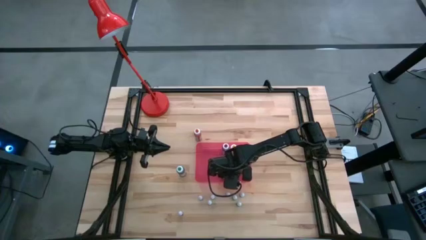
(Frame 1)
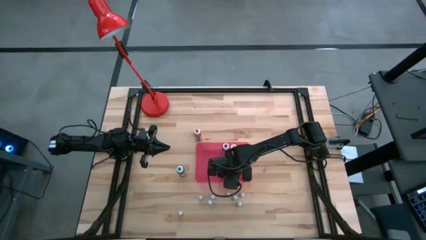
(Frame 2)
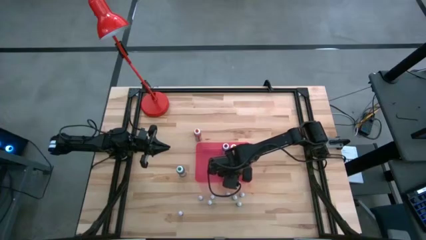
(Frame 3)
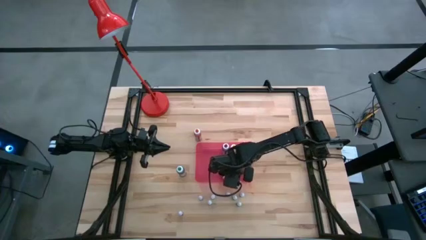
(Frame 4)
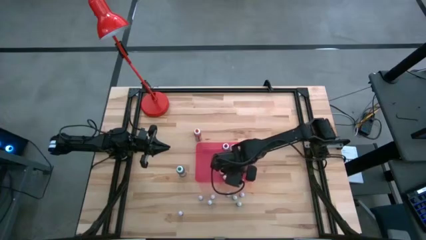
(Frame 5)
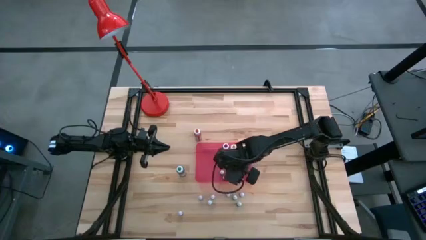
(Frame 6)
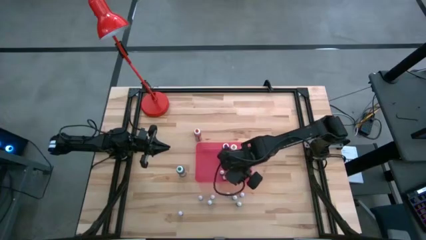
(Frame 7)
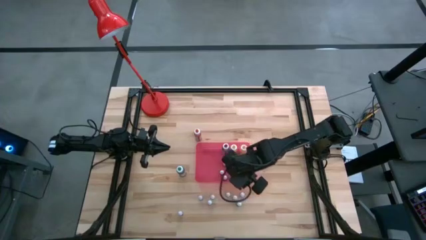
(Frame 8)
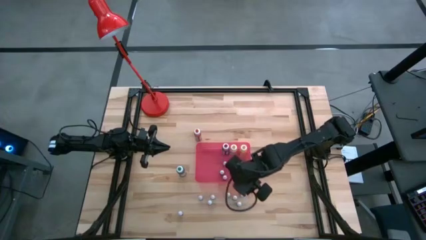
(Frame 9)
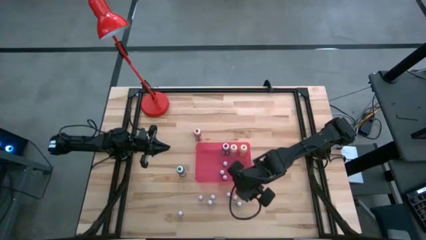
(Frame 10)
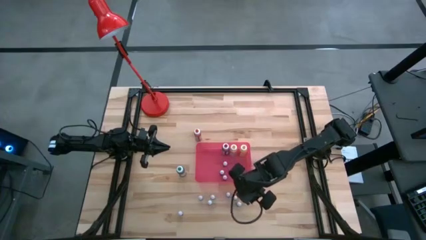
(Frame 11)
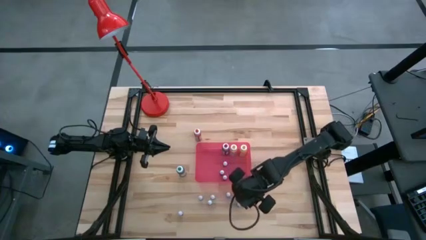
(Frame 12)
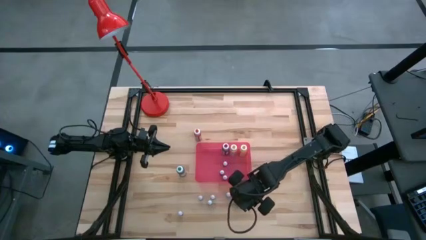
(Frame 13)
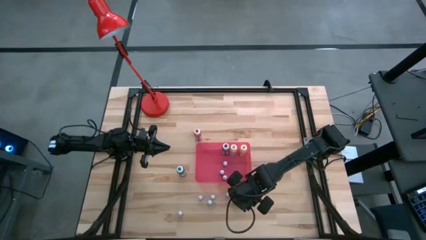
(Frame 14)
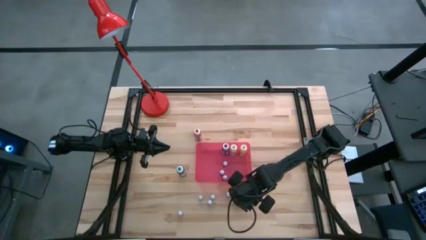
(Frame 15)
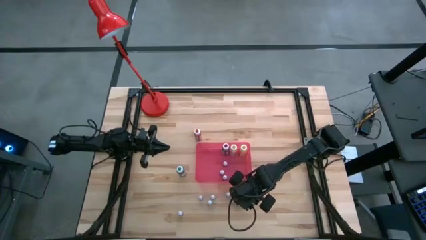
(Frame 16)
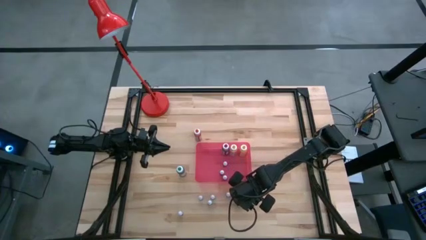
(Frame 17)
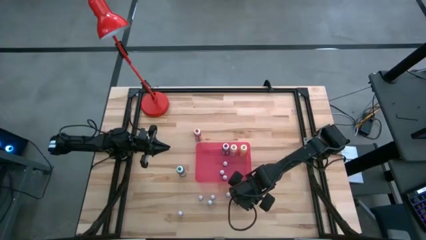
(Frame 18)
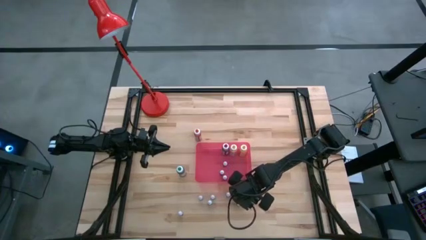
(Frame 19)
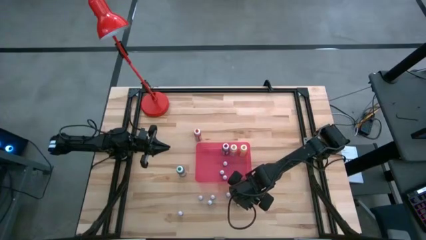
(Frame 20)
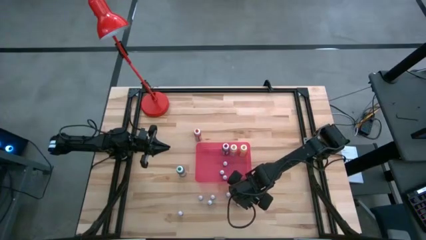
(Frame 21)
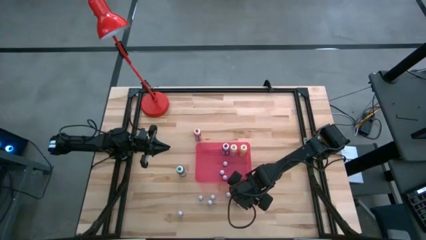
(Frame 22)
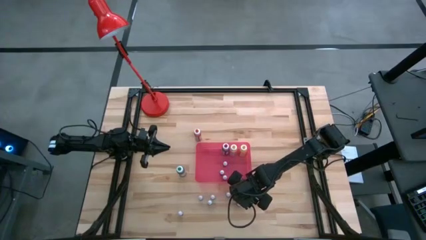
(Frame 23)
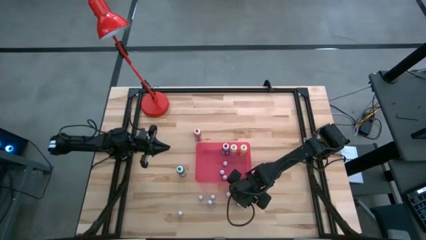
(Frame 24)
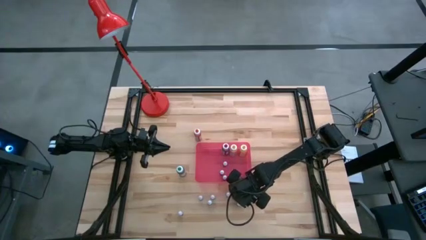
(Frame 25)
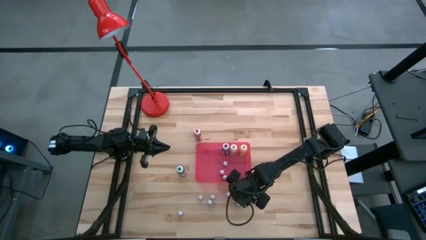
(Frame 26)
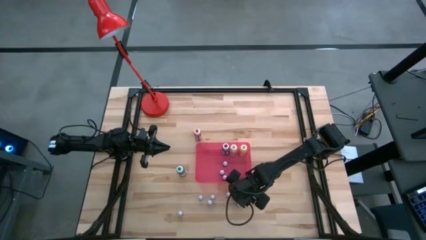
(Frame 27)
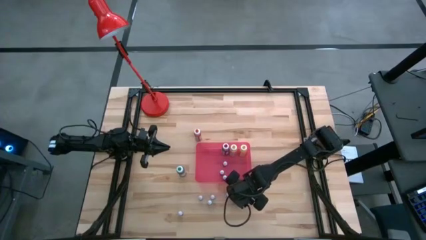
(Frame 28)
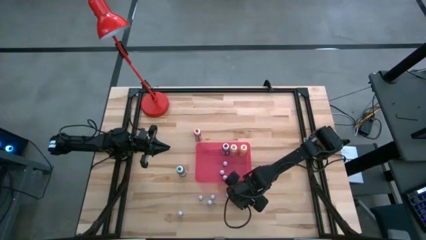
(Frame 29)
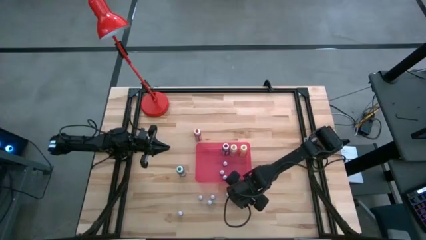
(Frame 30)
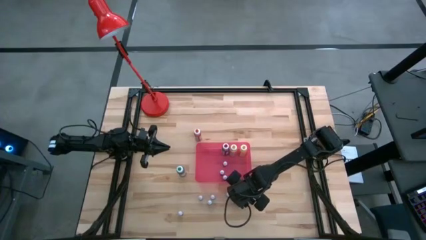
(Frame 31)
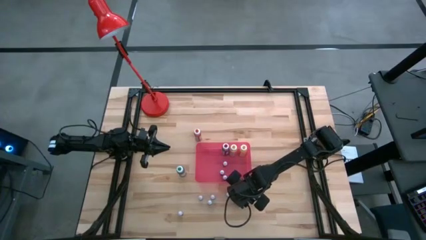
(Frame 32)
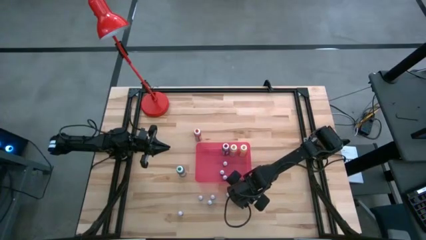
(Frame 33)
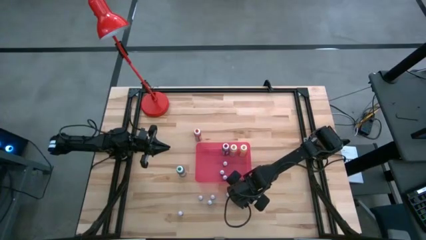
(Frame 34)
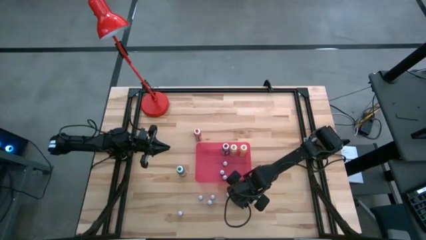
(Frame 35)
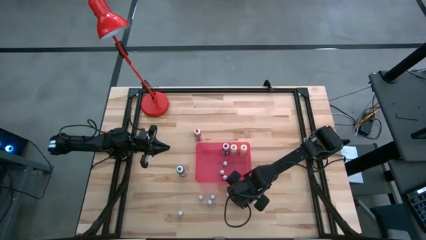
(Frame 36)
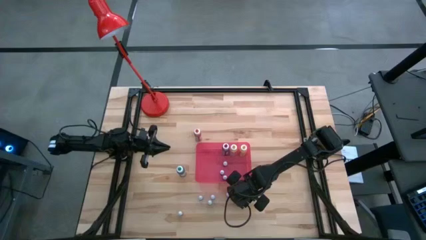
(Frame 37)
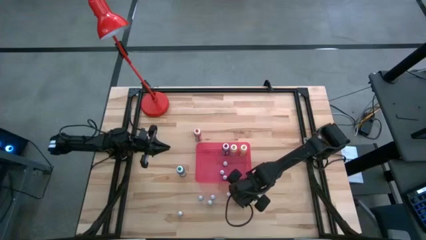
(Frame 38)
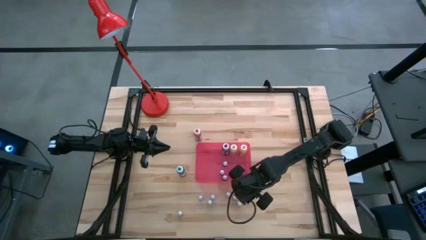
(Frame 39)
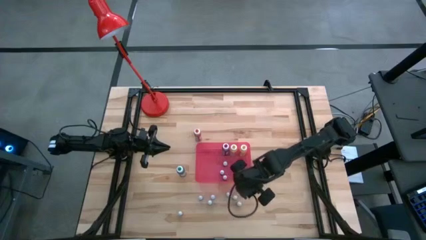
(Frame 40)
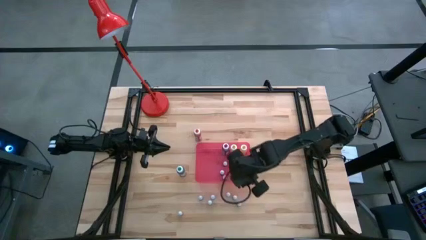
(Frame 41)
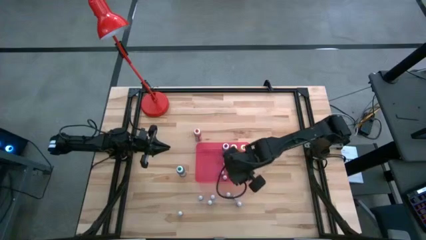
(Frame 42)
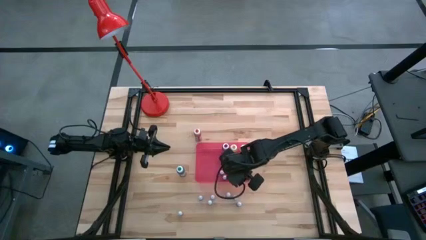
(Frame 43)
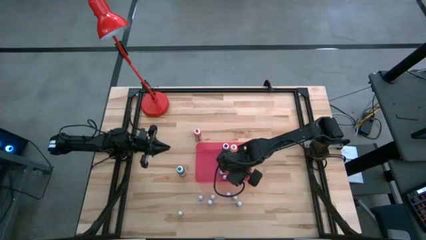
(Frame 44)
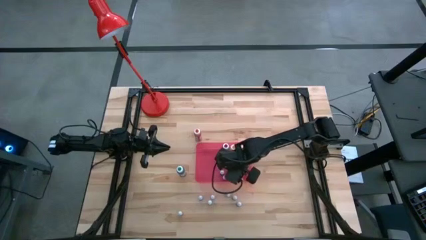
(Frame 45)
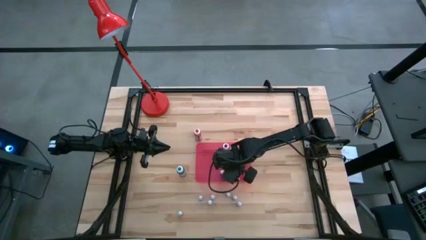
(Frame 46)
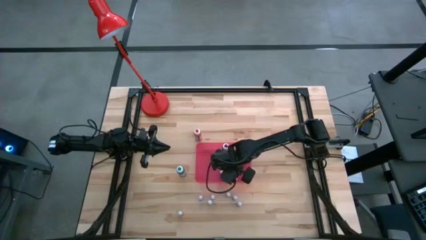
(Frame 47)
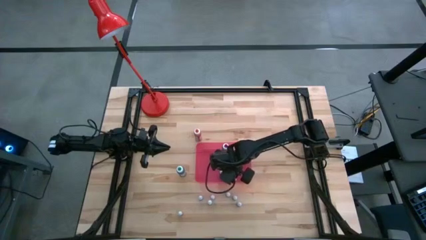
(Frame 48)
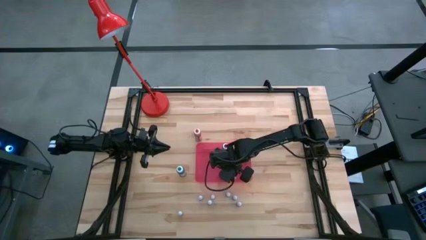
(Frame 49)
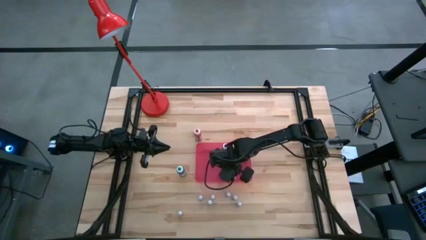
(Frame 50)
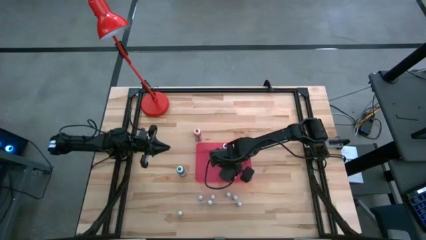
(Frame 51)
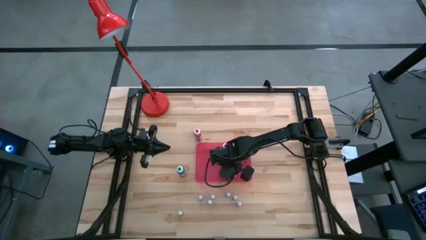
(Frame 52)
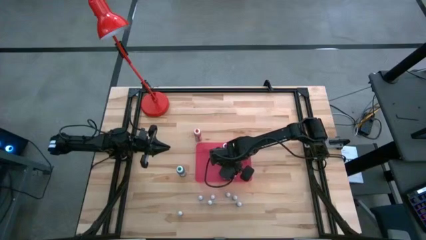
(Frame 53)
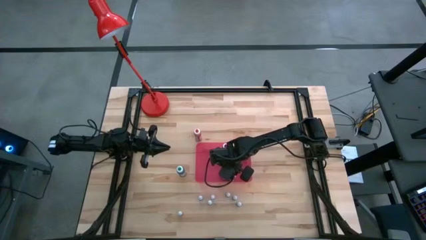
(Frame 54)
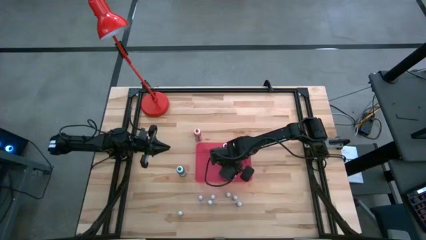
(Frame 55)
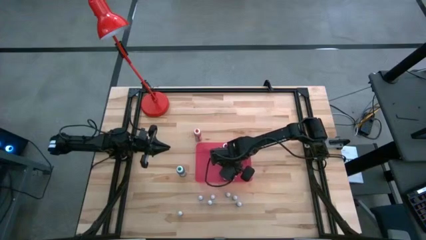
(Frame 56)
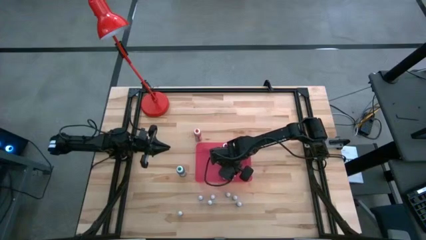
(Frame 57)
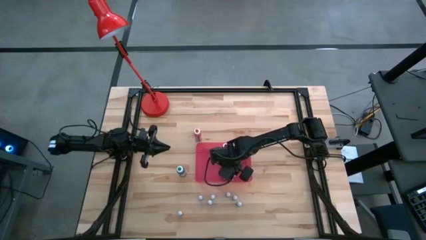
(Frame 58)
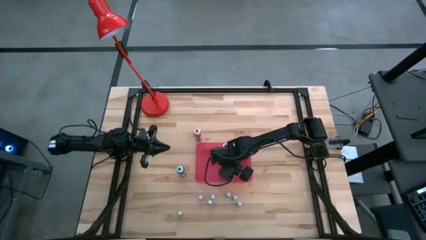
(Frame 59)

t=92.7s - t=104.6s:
Task: Pick & Place food coloring
Put the right small red food coloring bottle into the container

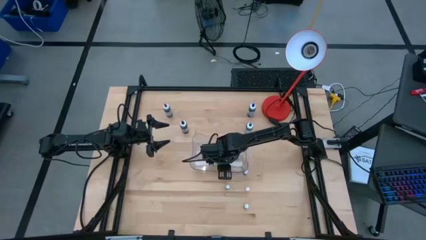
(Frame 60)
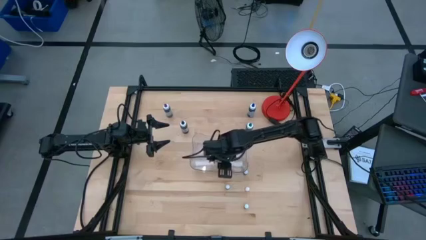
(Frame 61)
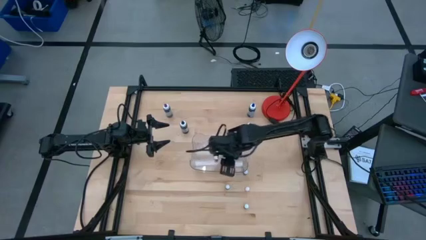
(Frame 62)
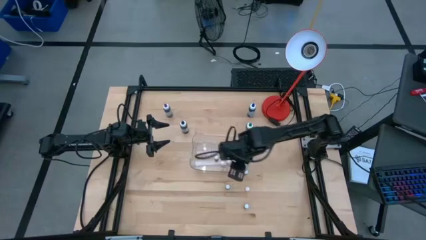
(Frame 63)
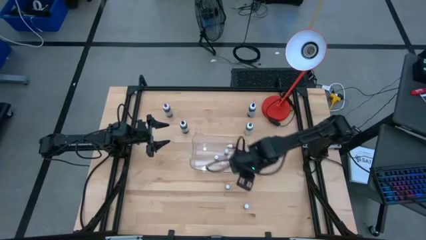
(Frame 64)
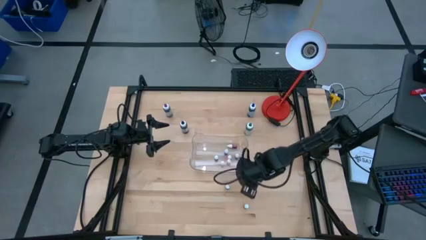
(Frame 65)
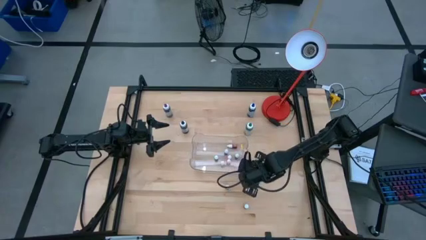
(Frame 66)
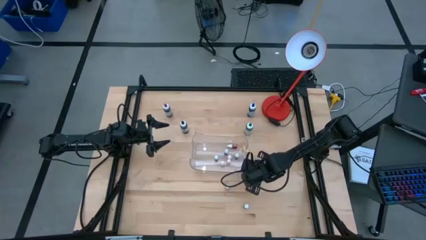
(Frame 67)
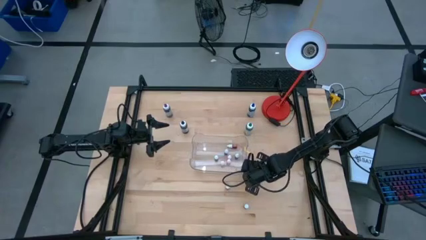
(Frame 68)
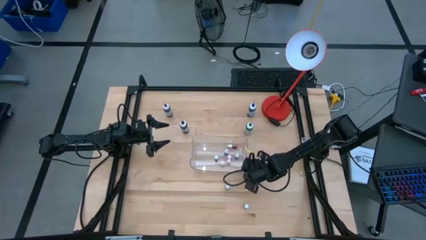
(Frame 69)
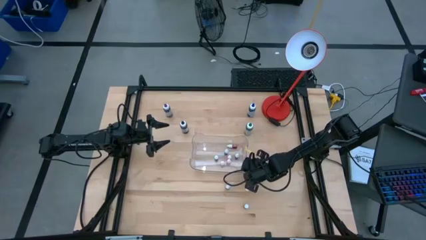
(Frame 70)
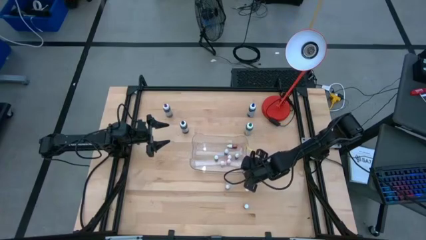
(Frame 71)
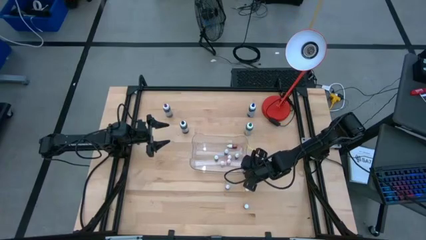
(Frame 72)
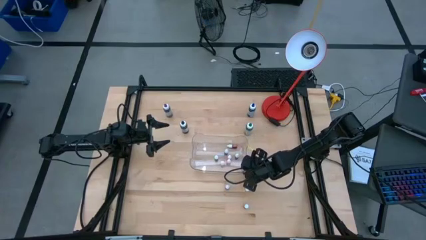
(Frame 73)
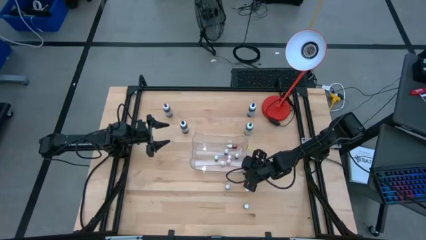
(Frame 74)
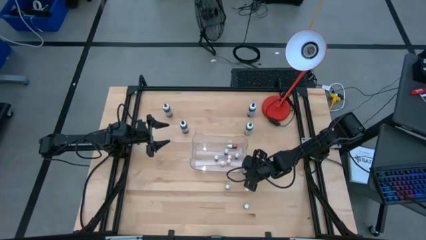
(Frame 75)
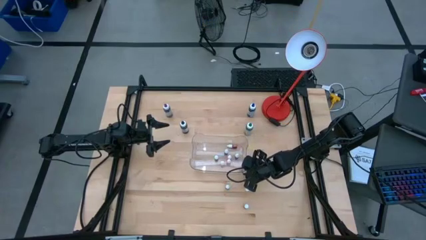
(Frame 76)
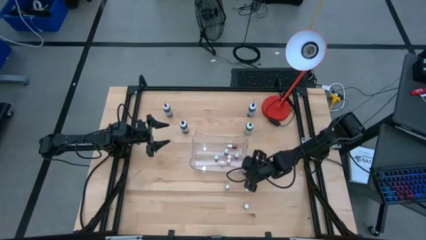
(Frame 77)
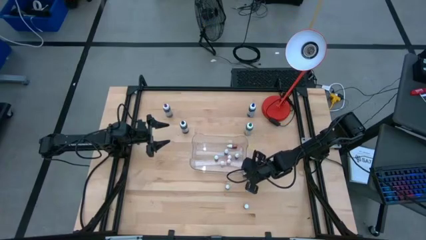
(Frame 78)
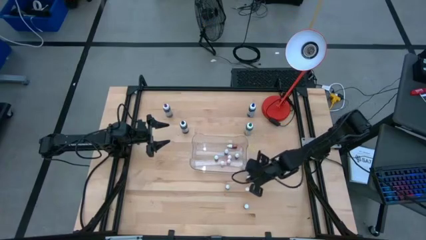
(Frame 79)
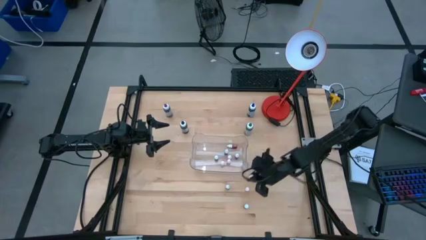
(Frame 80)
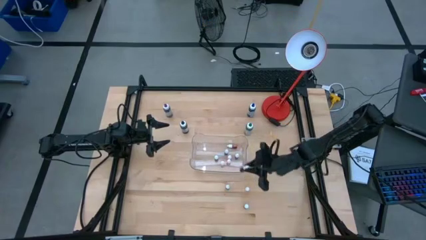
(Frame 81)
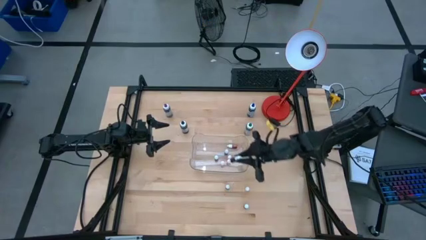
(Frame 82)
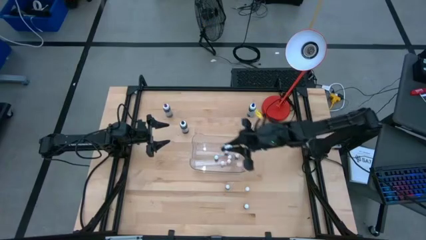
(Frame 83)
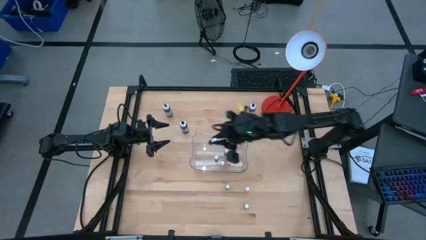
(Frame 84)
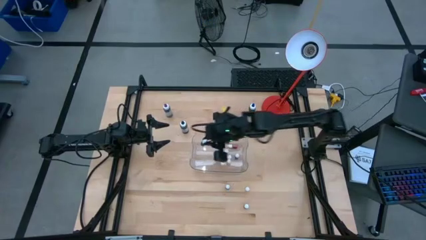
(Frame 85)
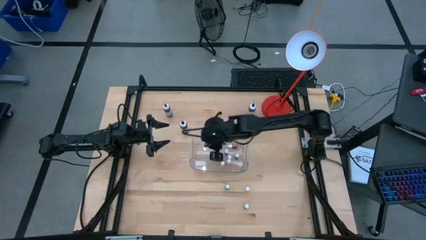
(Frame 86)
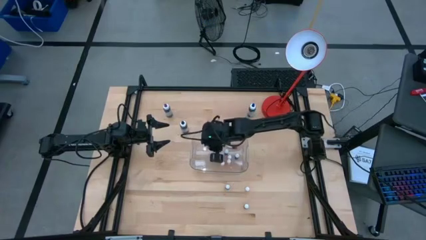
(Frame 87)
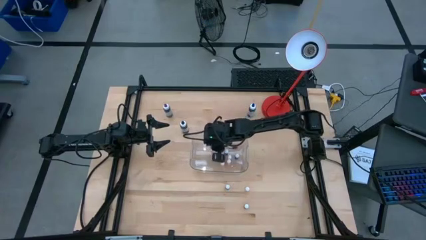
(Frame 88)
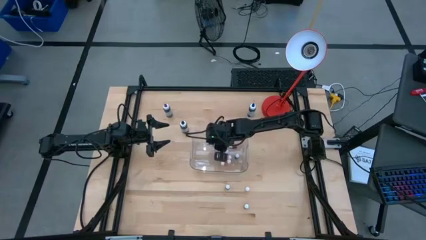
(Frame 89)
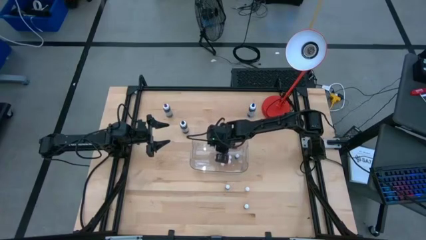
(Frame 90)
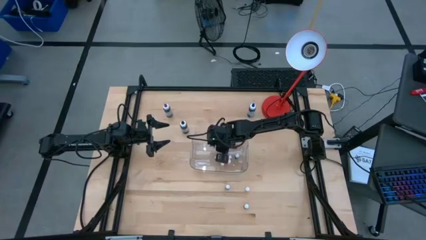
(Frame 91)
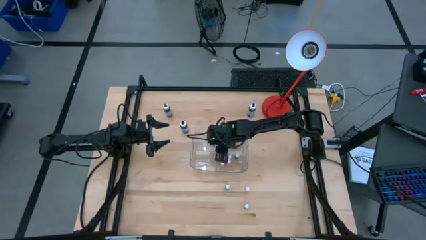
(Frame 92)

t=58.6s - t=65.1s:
Task: Pick & Place food coloring
Put the small green food coloring bottle into the transparent bin
